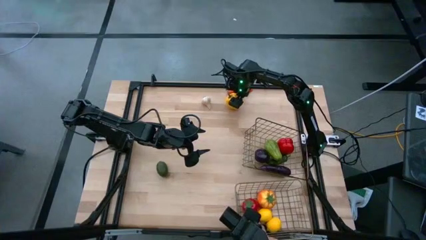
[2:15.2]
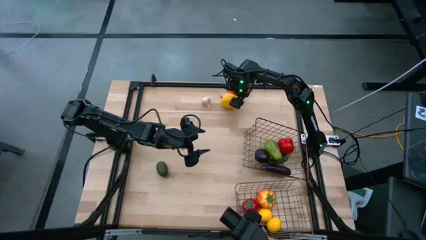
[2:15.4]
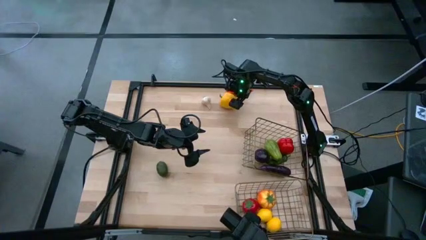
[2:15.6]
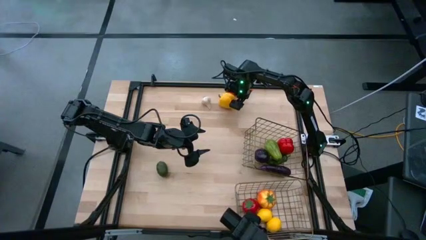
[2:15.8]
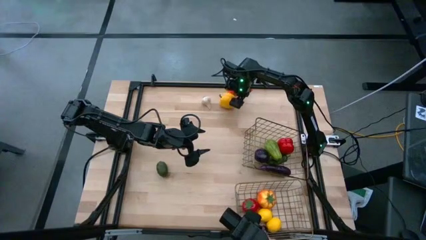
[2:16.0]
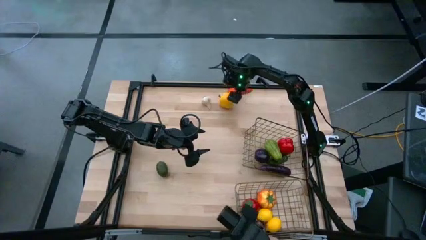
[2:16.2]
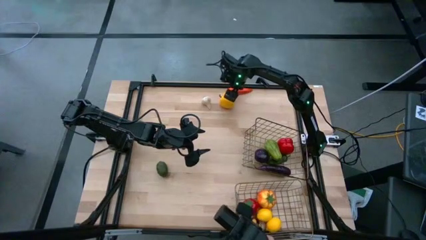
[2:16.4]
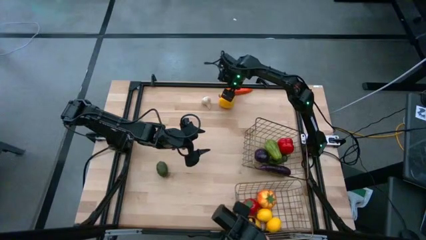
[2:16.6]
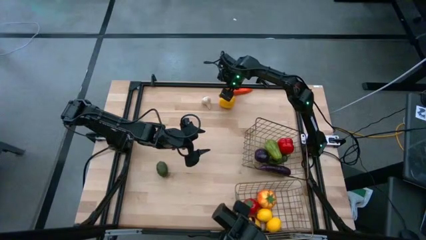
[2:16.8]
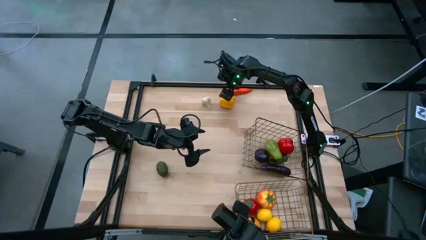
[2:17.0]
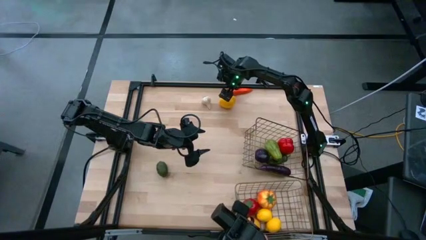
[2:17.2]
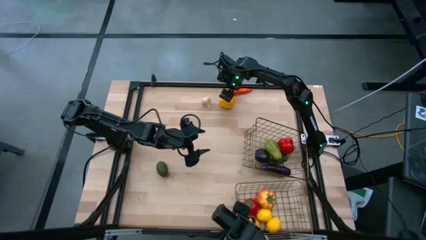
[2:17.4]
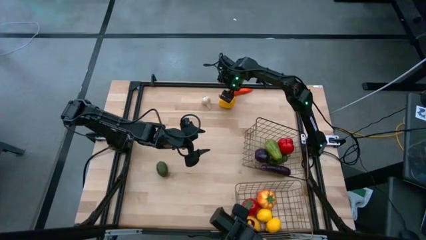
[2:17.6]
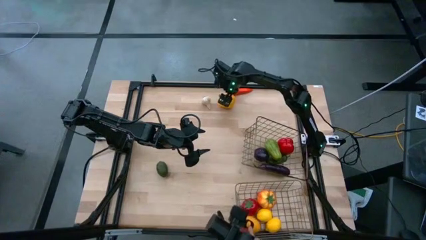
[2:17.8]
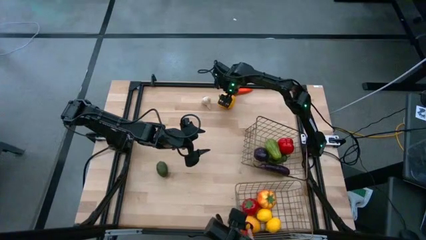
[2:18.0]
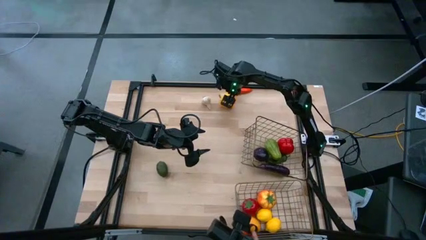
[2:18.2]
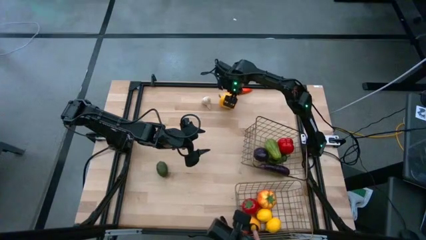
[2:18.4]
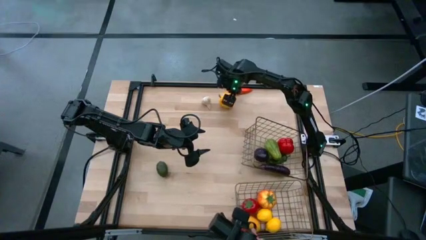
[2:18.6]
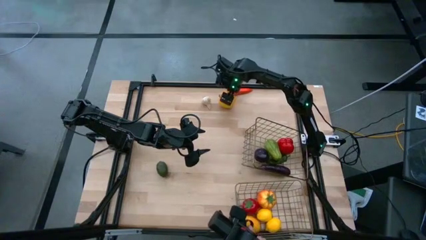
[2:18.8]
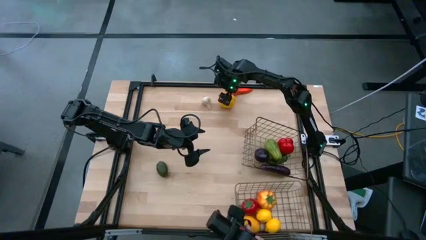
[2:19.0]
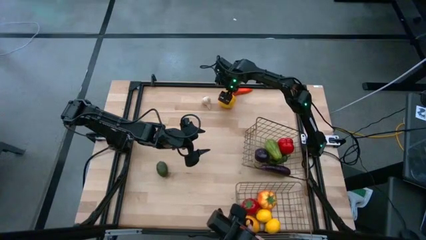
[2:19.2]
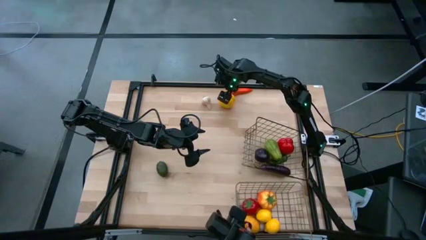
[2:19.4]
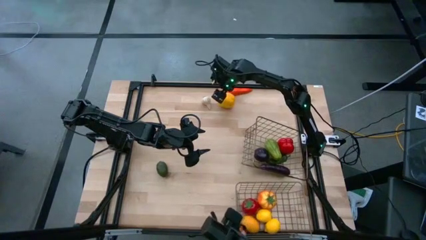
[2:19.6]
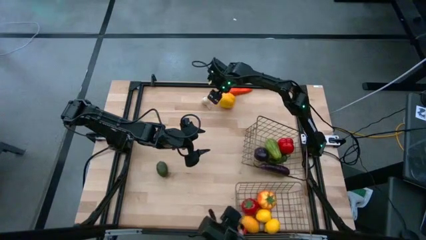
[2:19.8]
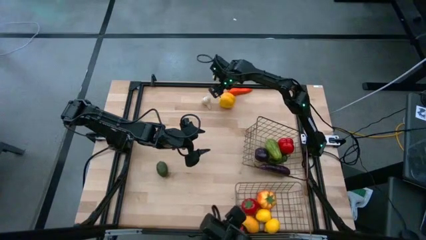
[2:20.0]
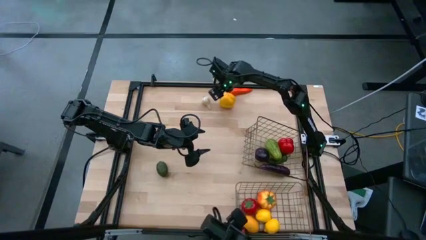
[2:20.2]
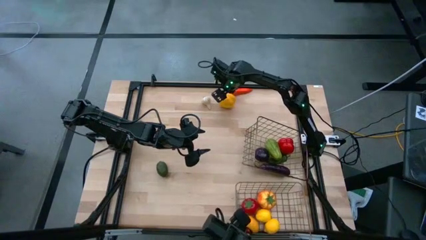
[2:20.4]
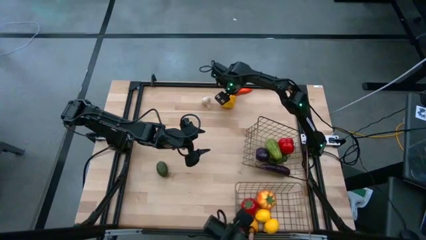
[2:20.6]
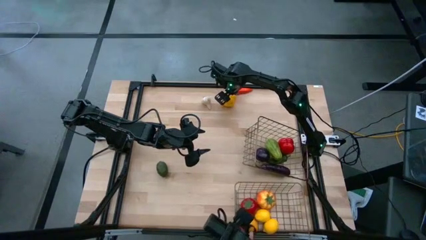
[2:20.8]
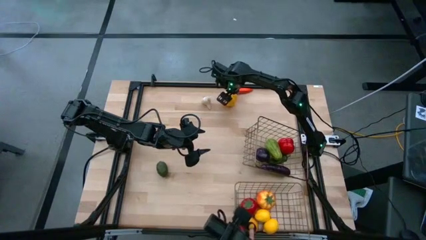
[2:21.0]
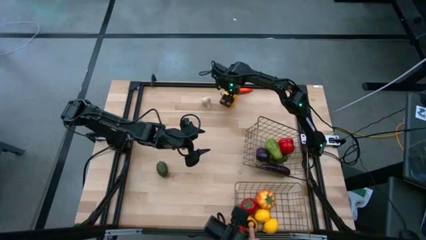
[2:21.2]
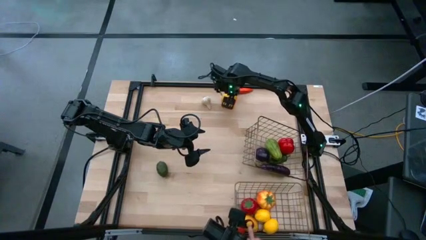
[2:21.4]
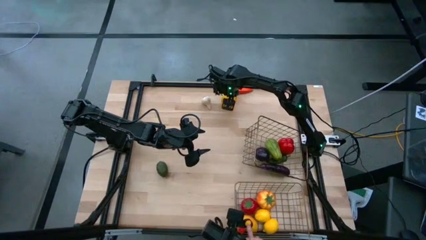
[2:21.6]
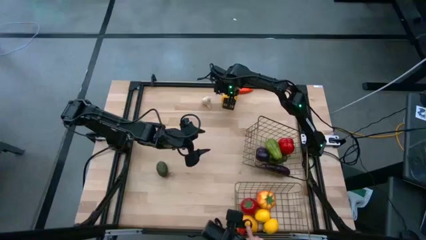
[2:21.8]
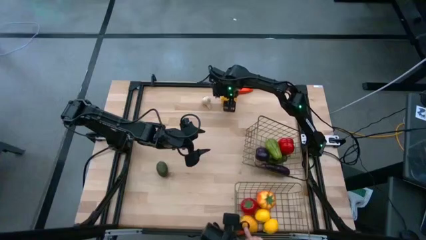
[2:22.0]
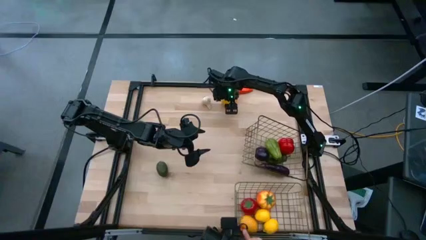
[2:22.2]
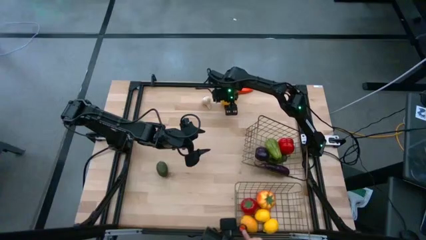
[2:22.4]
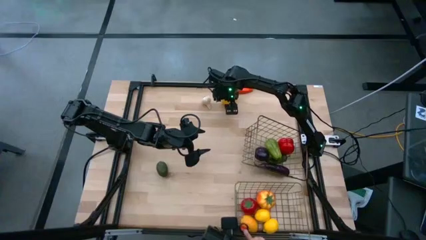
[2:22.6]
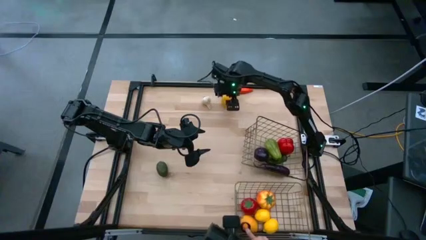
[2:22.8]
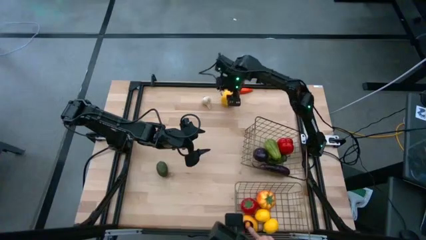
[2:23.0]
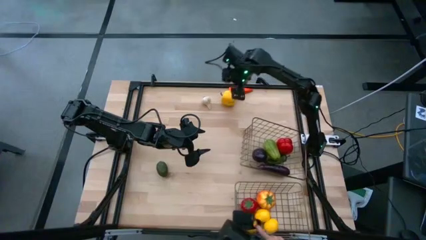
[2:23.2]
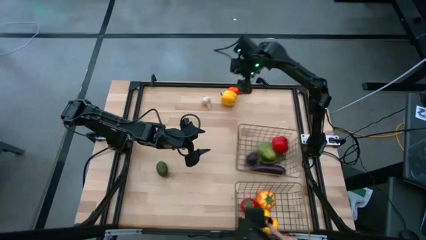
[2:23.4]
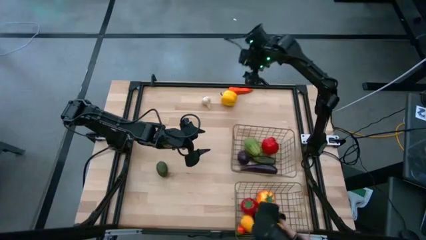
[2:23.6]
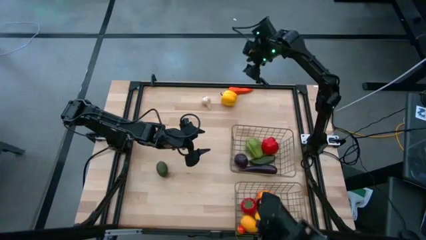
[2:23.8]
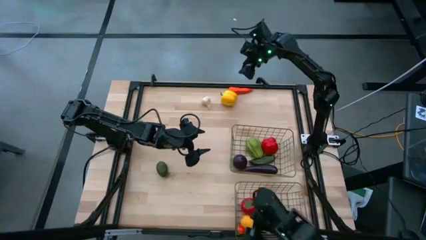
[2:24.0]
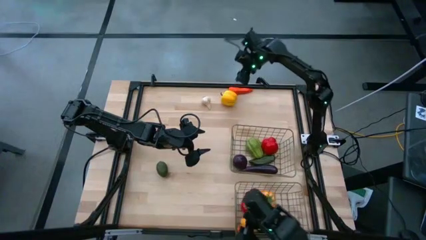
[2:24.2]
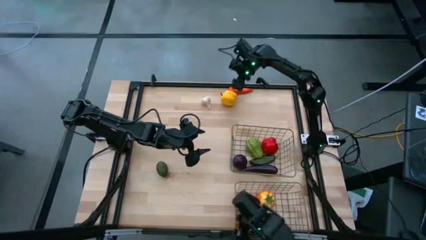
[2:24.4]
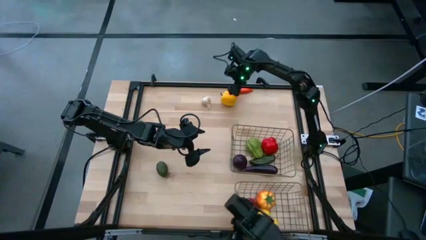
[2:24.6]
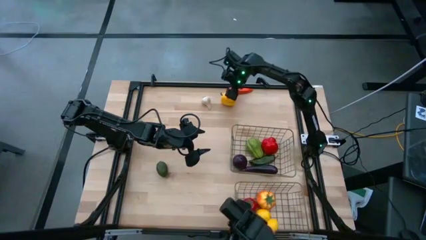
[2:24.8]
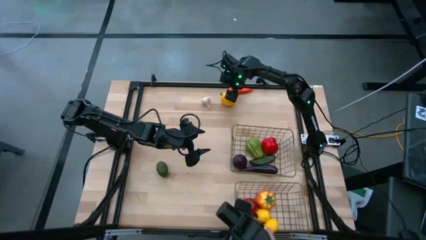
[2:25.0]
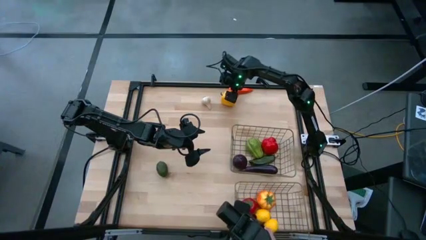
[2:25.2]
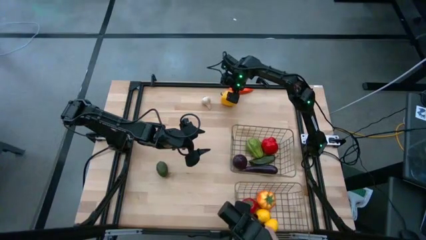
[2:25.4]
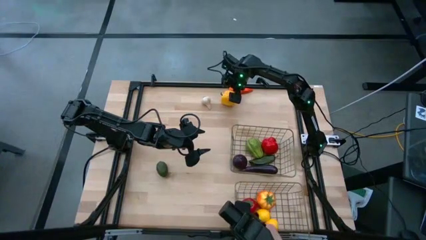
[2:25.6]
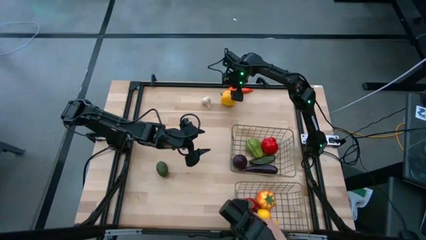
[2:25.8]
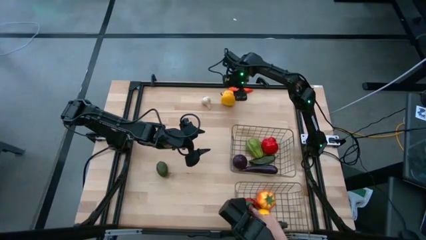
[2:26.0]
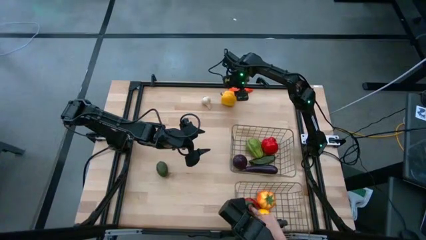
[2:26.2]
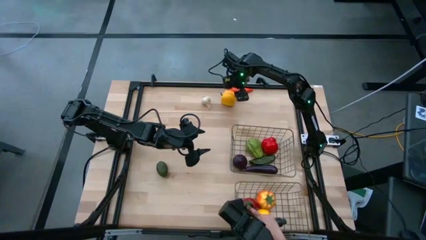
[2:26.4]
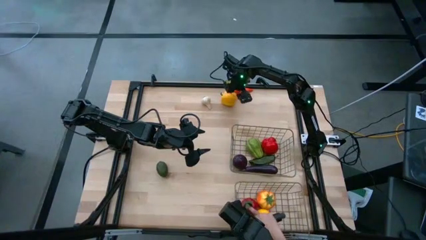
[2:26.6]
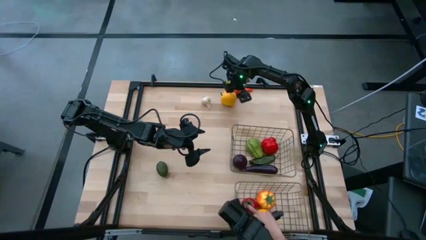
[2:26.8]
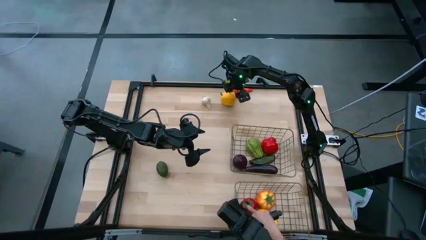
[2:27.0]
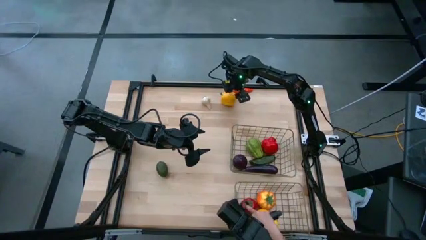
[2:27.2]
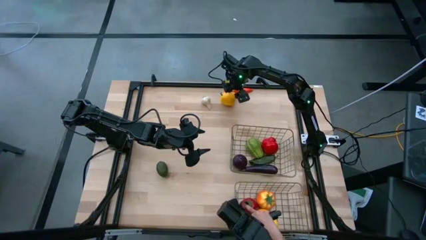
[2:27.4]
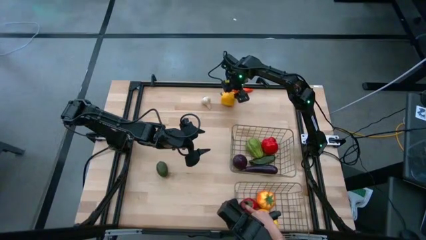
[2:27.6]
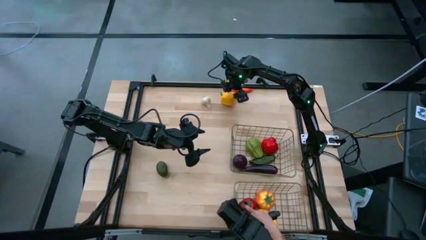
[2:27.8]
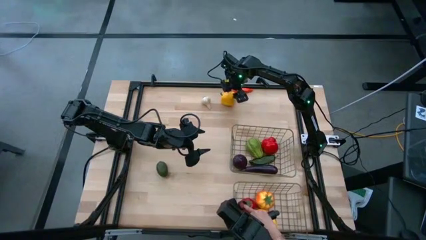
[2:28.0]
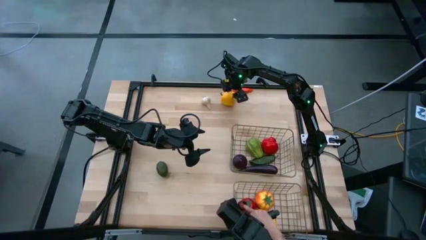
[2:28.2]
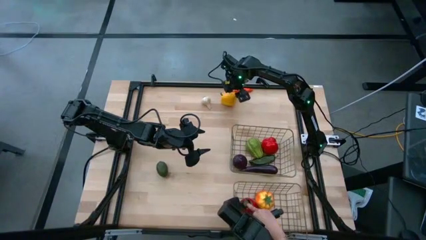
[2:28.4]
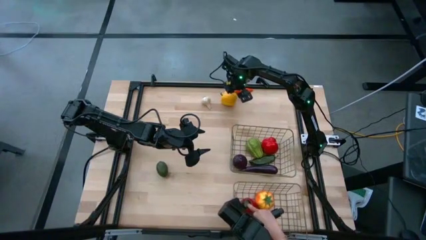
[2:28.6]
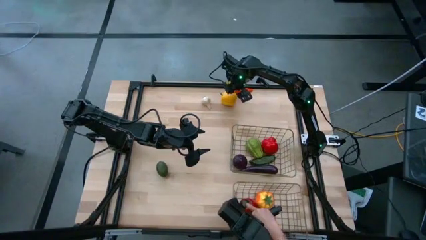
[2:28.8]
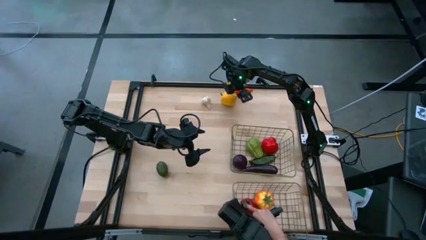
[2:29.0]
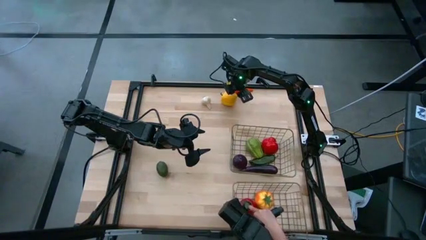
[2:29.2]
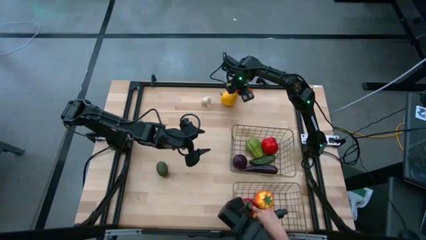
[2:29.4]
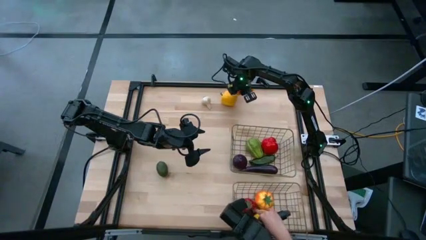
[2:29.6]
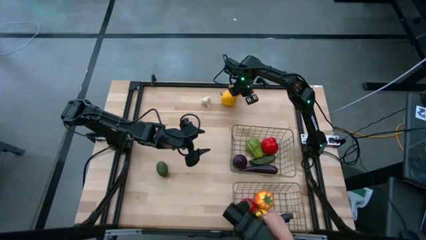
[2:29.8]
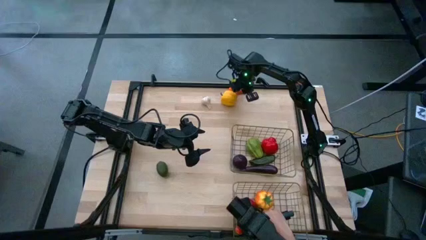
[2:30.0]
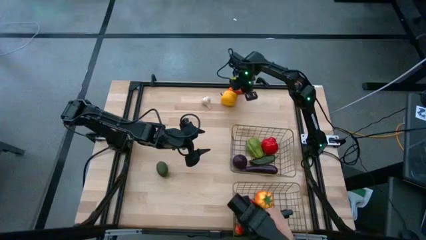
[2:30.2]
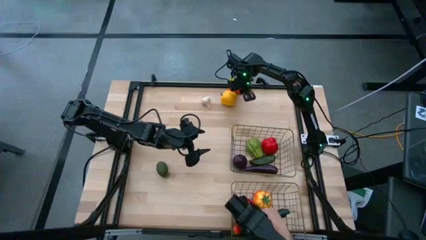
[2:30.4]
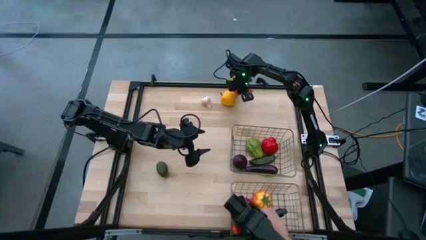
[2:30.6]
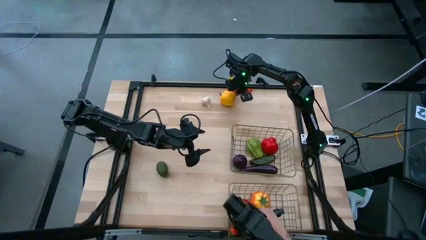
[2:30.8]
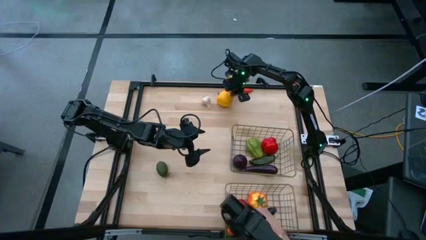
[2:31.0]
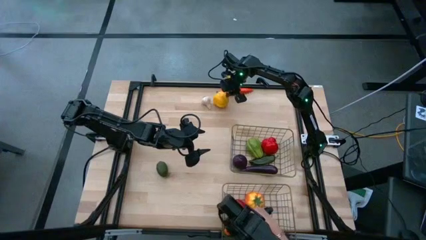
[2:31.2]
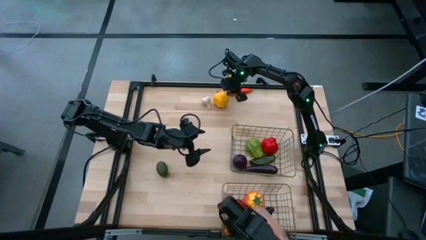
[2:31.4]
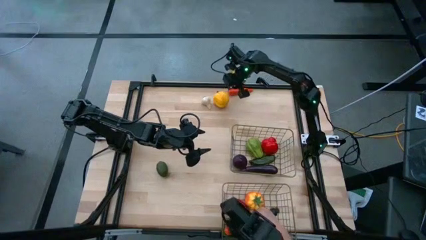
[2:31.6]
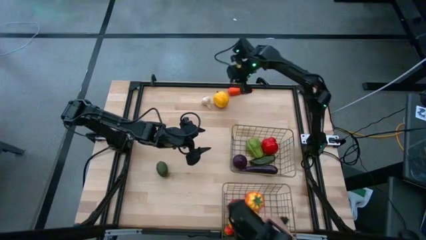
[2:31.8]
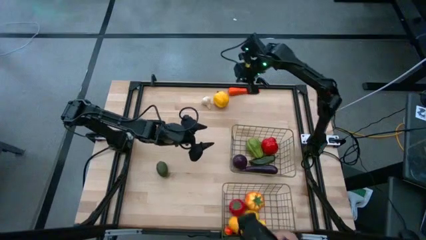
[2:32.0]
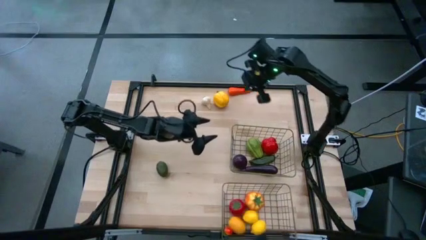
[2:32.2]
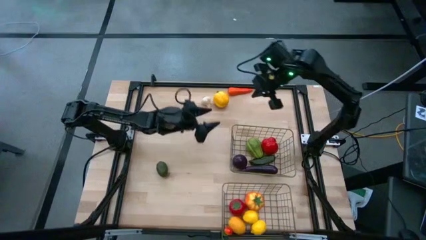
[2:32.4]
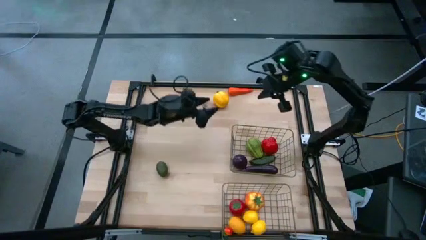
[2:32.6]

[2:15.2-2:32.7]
Task: Sort produce into baskets
Put the yellow bell pepper into the top wire basket
